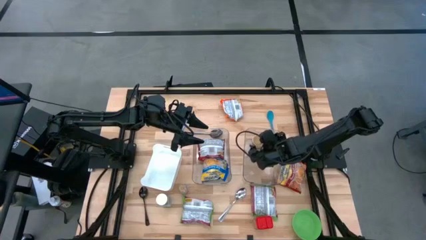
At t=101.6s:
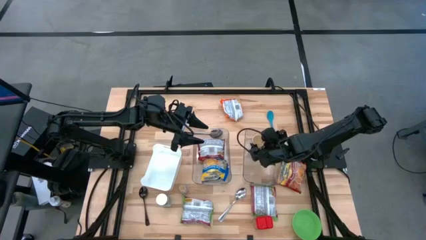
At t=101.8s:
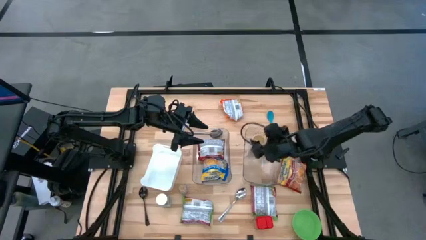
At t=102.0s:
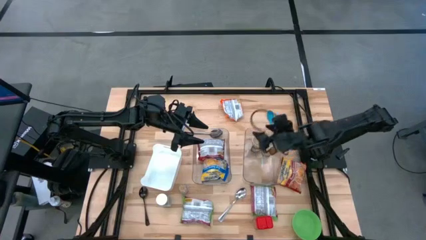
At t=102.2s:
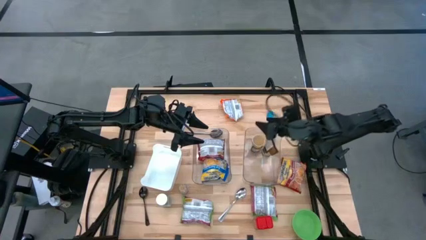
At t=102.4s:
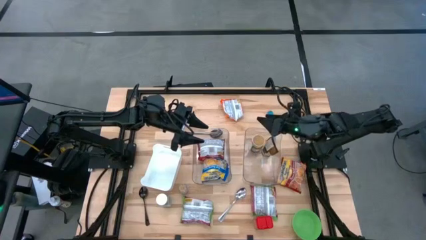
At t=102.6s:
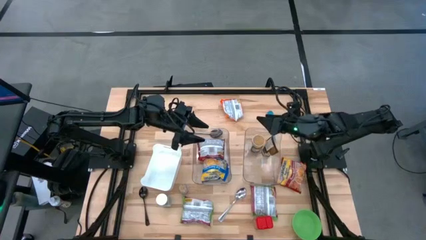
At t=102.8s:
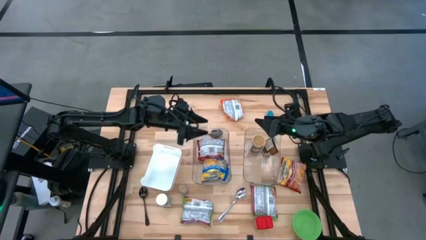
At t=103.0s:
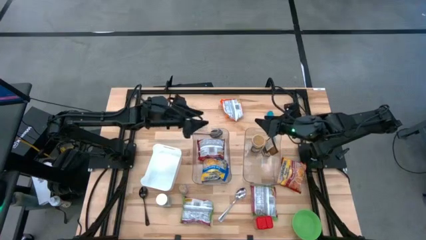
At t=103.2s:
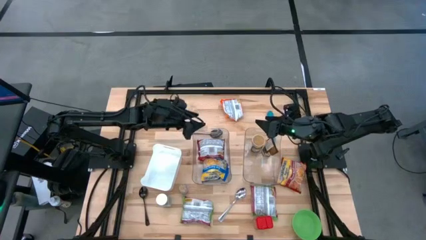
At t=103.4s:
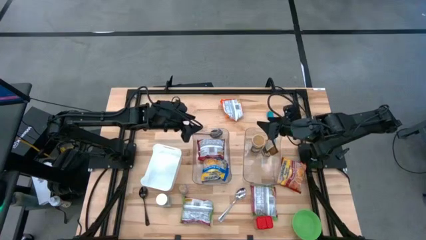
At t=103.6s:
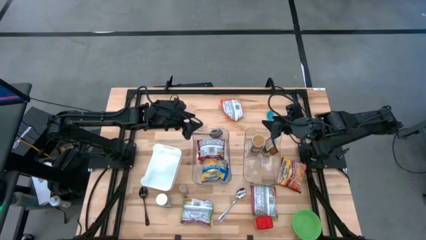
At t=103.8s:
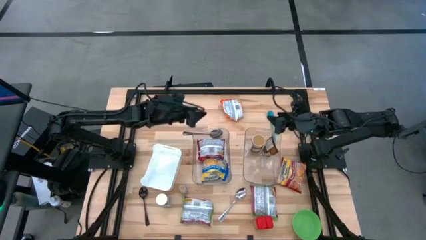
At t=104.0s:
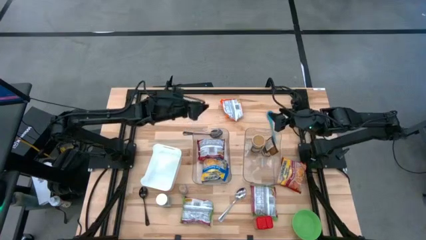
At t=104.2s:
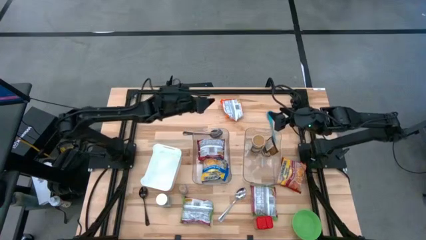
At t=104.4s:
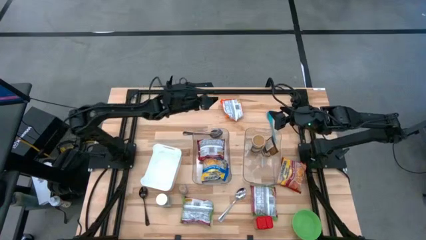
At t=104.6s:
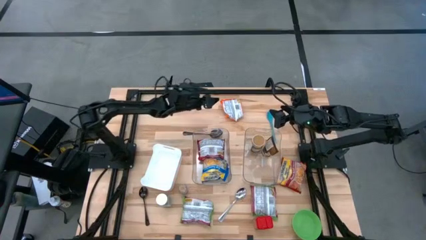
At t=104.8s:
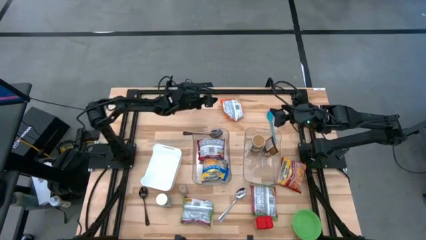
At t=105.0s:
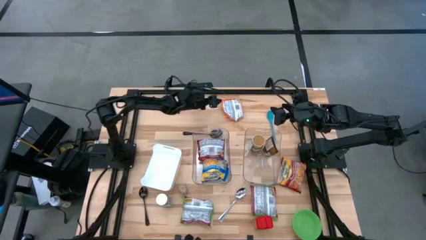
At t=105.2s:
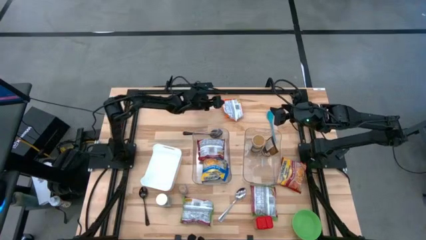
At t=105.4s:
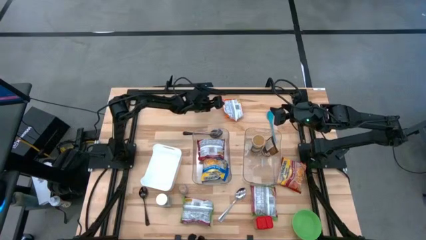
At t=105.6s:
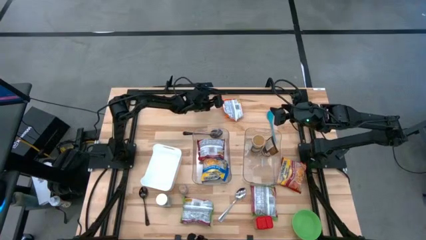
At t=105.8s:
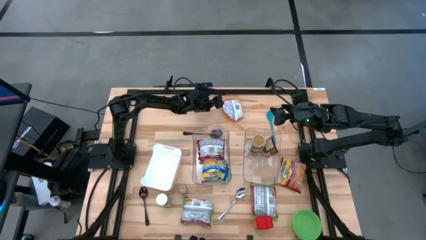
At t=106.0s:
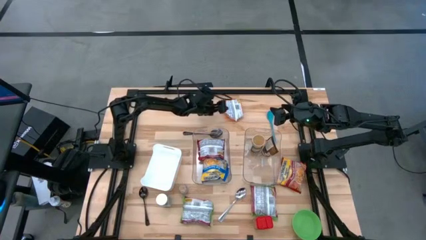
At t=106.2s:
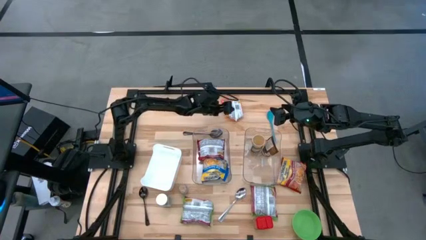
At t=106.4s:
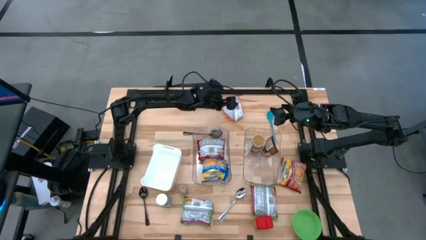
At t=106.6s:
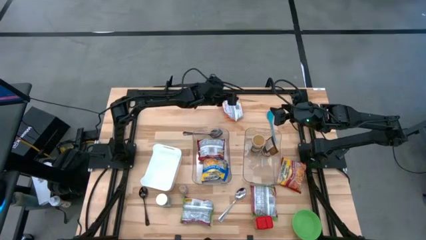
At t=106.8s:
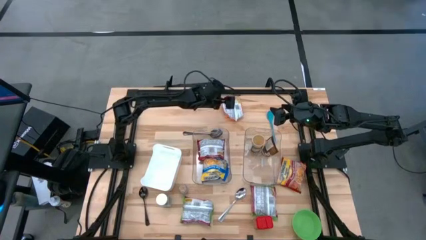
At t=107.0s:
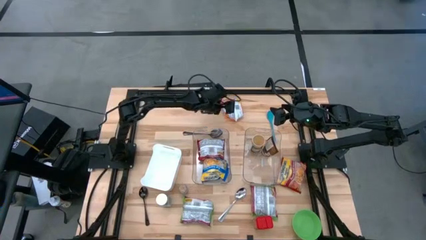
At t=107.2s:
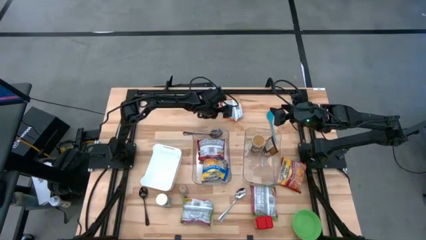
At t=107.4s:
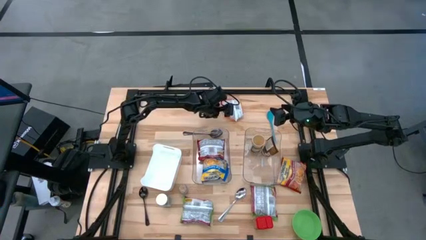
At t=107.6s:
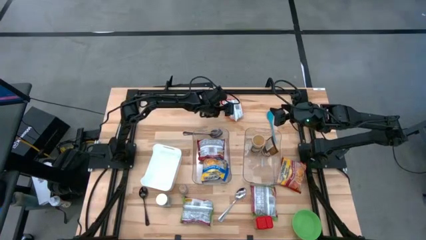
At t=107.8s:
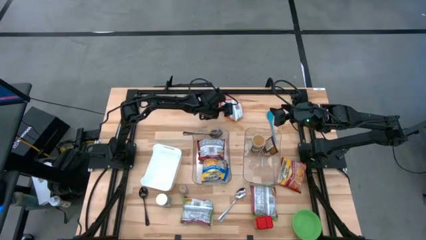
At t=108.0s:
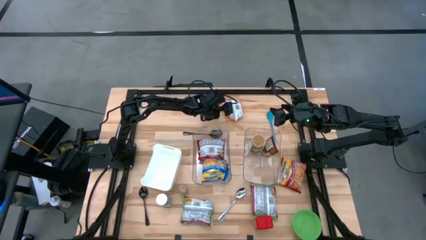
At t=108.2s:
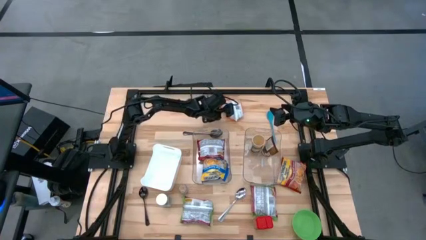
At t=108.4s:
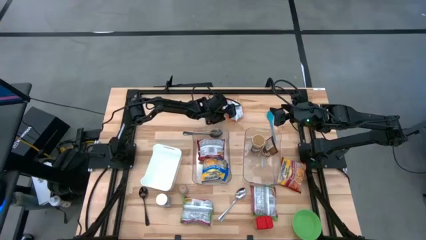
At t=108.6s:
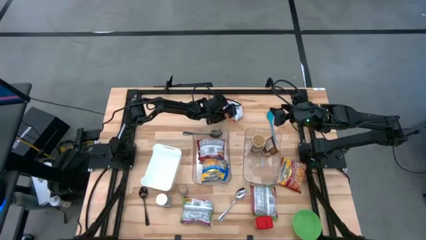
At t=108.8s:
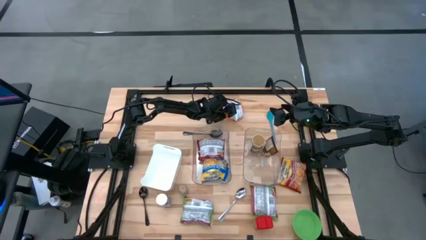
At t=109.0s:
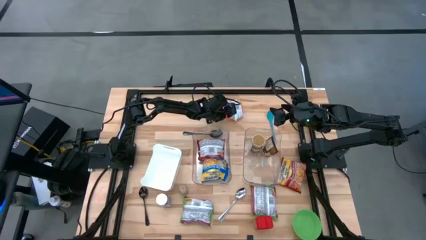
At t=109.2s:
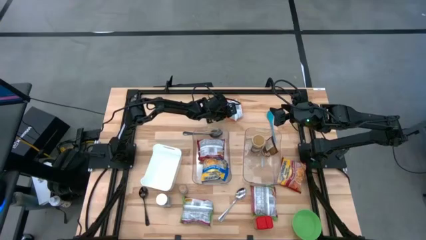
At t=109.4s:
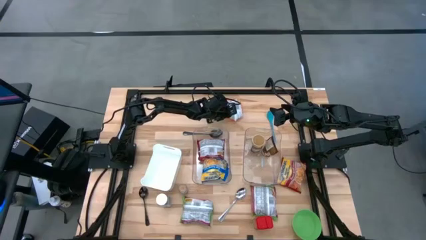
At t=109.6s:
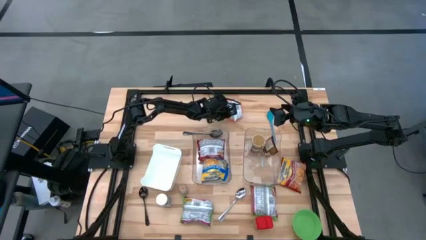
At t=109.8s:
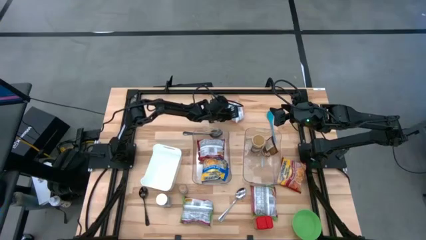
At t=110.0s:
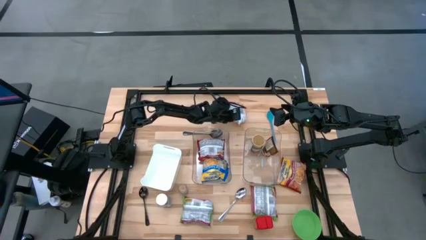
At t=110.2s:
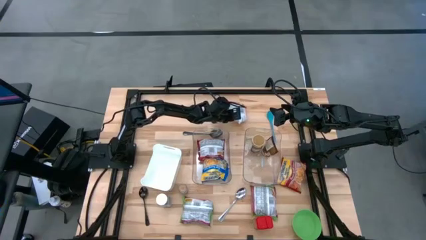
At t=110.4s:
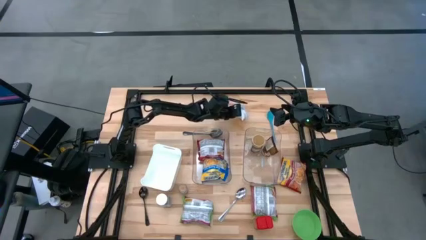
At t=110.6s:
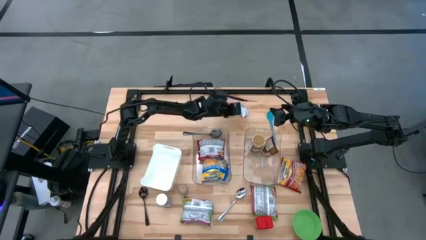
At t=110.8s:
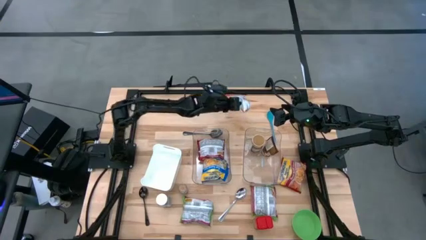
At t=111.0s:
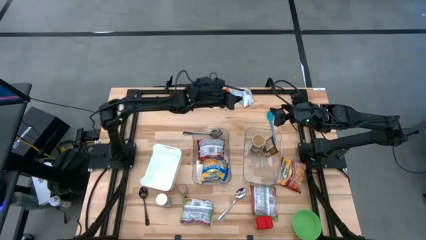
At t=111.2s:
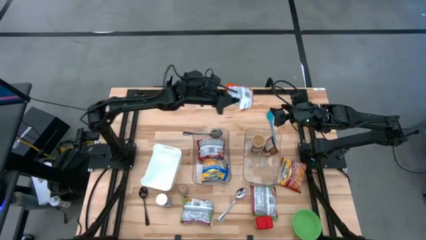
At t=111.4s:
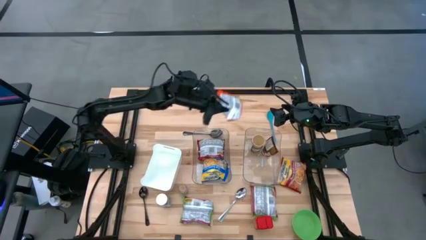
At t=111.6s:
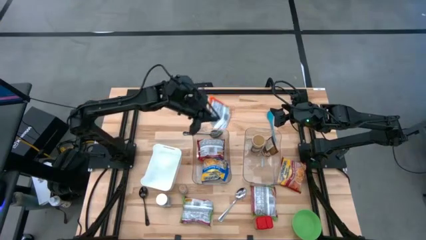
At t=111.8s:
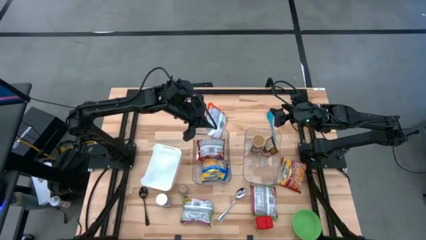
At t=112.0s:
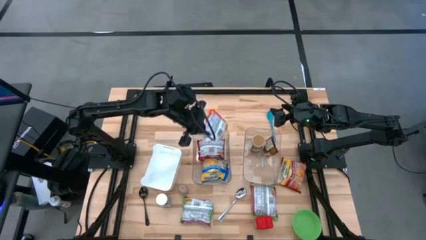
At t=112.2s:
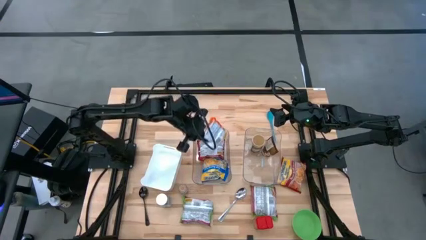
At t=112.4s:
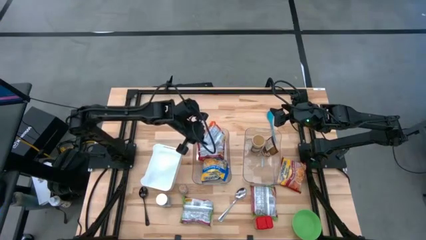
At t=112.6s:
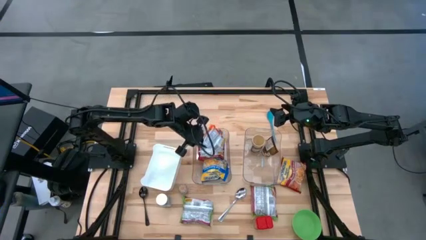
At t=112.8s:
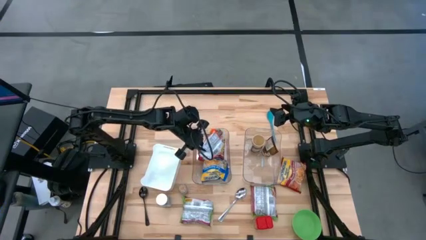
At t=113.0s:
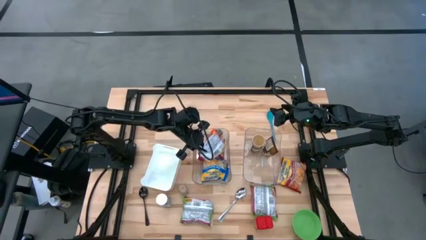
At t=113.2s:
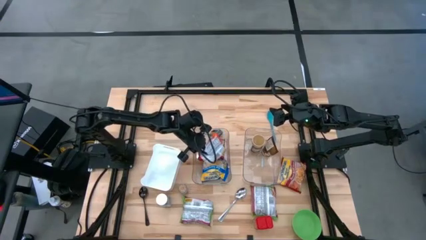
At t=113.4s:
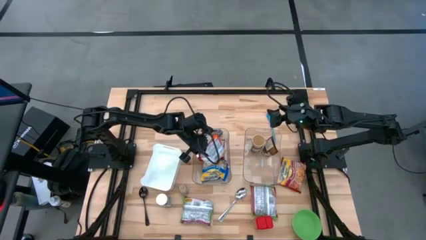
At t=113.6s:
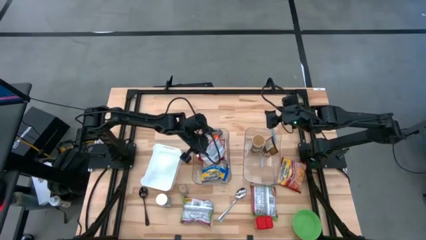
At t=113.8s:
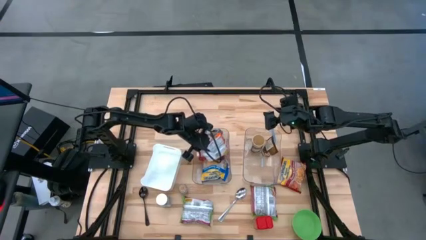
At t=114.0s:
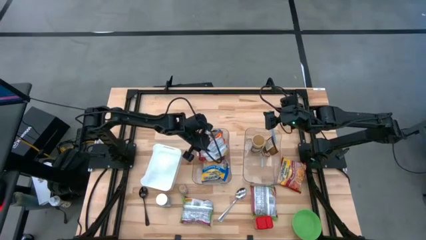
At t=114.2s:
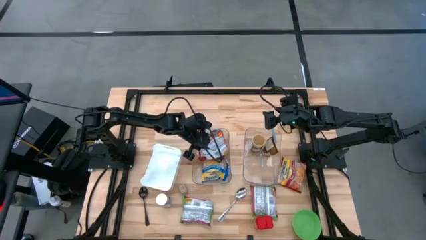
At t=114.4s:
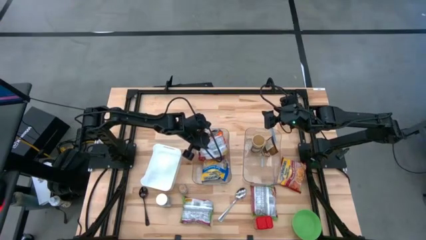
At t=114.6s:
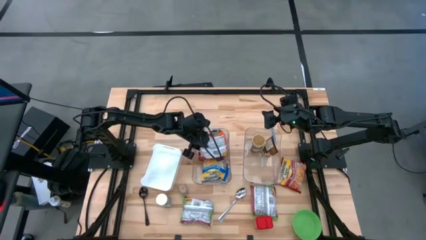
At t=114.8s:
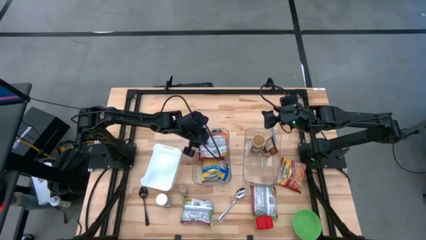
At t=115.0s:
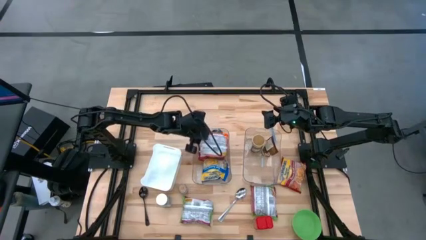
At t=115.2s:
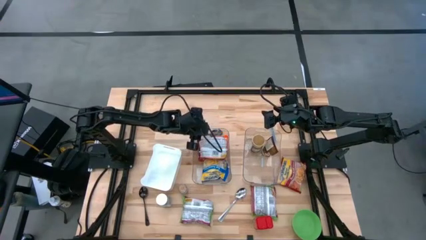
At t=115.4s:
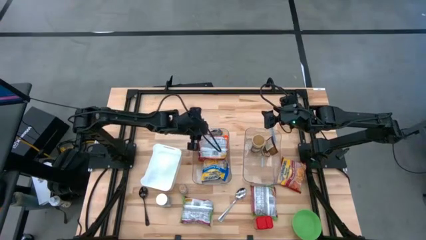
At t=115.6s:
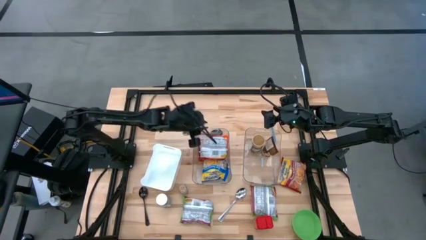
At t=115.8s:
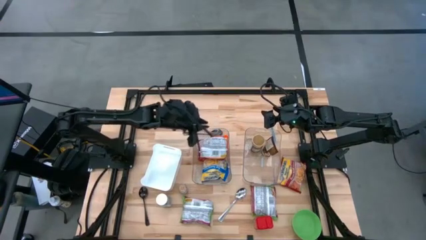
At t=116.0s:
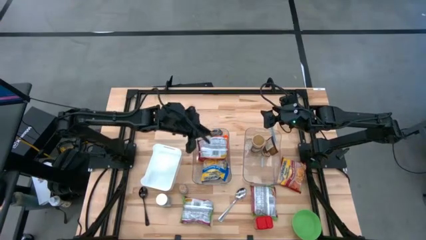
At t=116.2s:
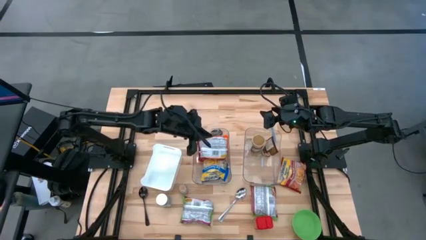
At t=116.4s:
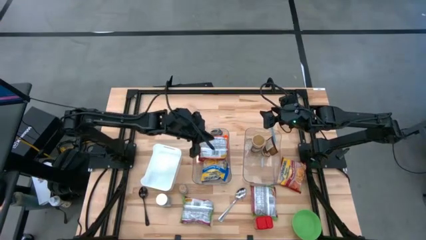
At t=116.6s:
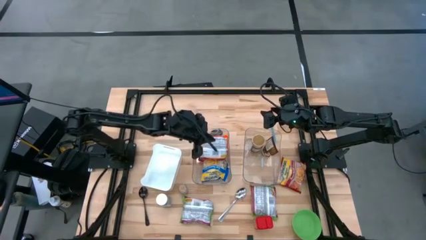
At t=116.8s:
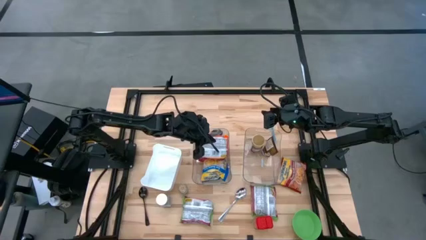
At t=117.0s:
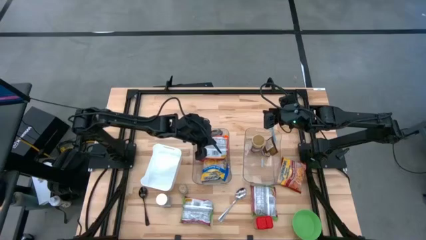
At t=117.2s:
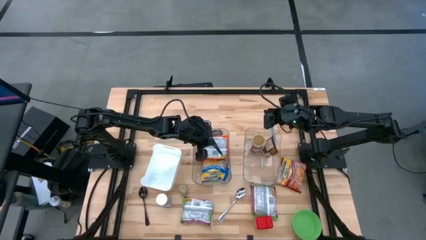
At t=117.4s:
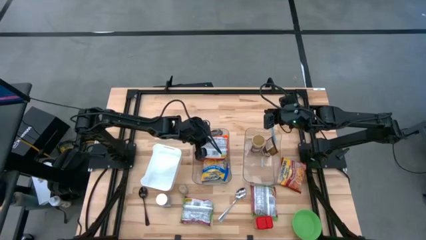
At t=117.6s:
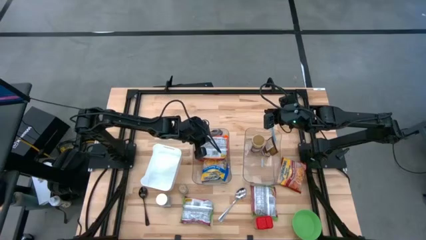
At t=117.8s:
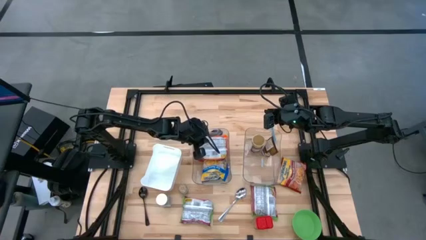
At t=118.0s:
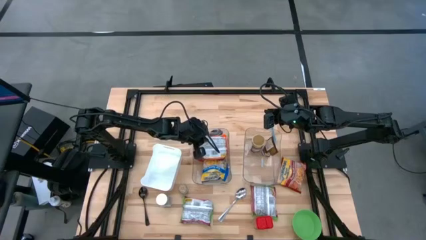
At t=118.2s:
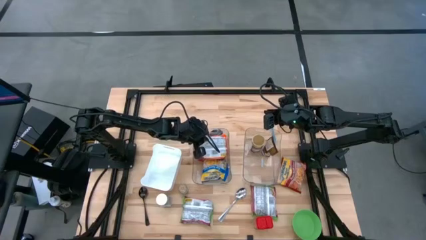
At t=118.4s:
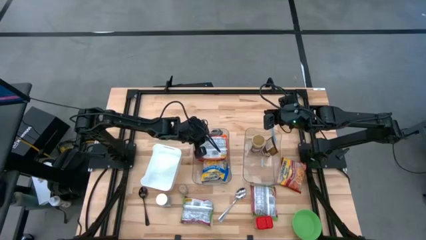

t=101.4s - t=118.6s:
Task: Pick & Place Food Item
Put the orange noodle pack into the left transparent bin
